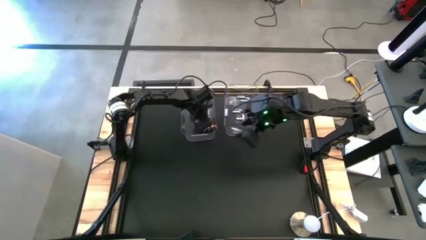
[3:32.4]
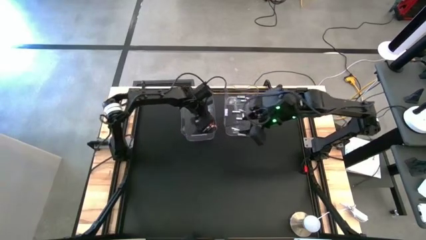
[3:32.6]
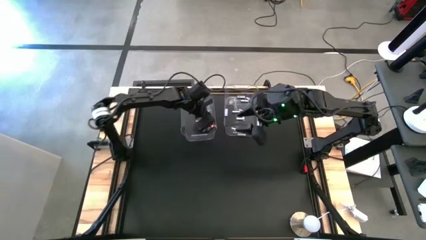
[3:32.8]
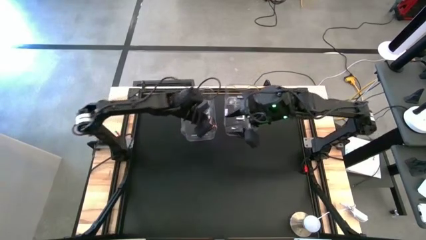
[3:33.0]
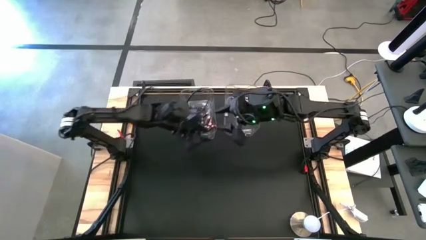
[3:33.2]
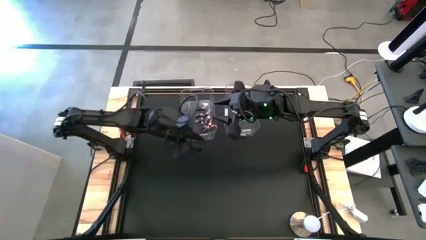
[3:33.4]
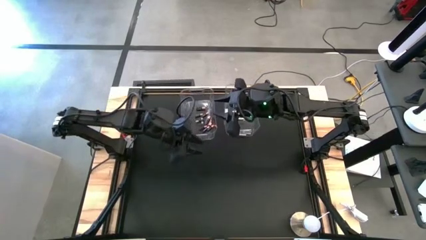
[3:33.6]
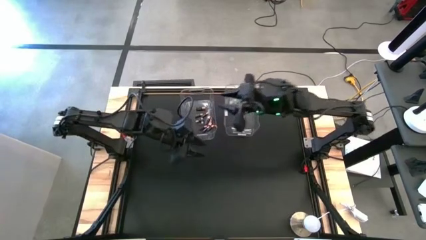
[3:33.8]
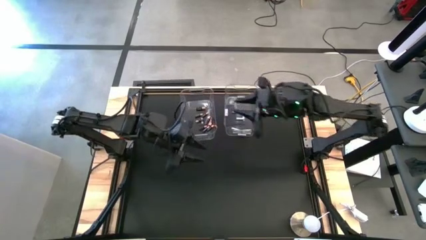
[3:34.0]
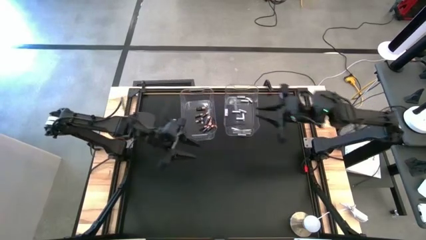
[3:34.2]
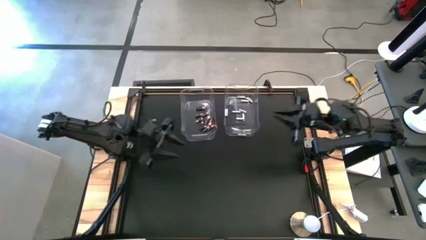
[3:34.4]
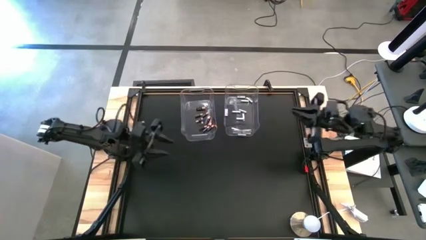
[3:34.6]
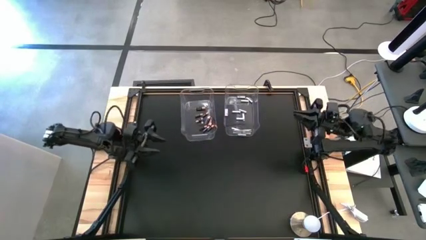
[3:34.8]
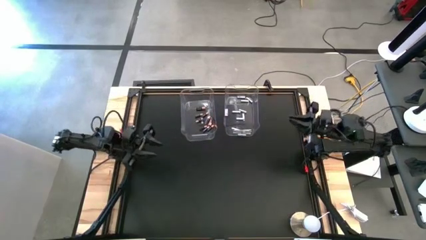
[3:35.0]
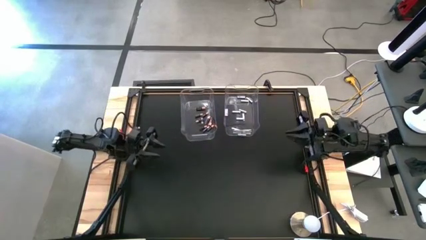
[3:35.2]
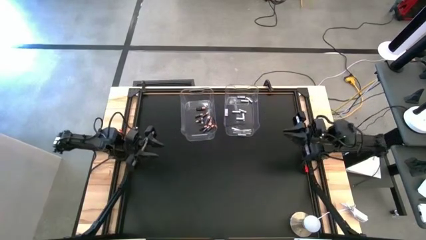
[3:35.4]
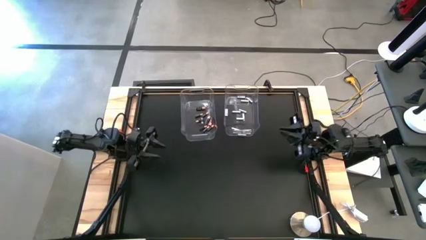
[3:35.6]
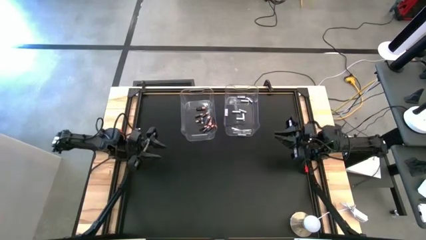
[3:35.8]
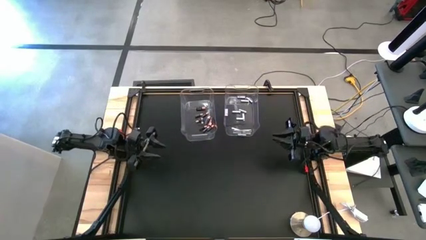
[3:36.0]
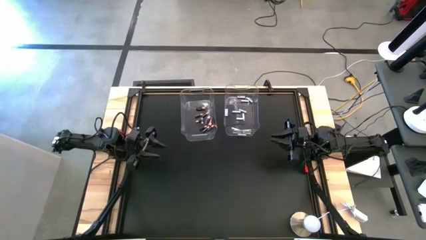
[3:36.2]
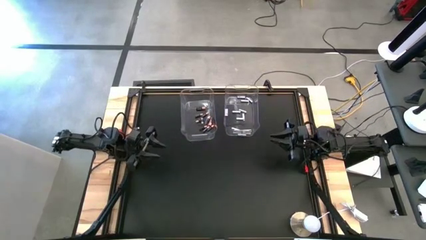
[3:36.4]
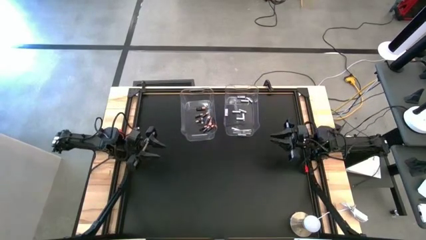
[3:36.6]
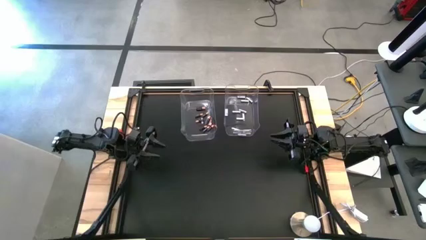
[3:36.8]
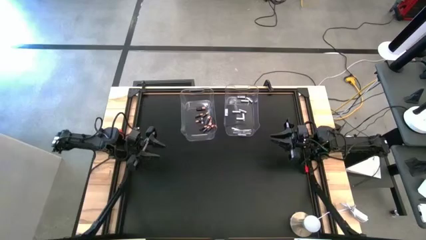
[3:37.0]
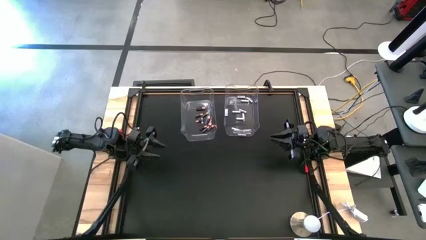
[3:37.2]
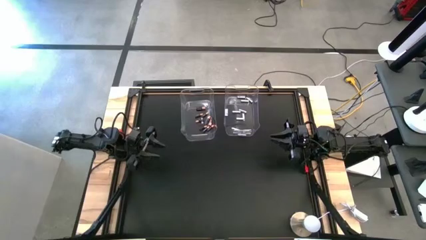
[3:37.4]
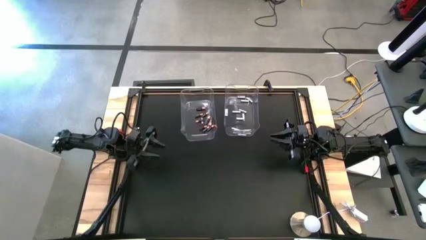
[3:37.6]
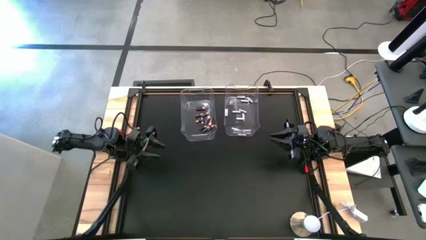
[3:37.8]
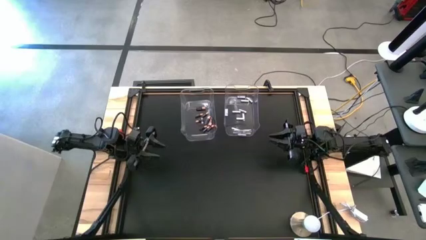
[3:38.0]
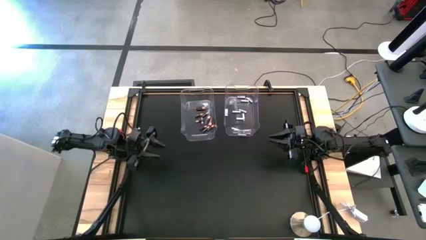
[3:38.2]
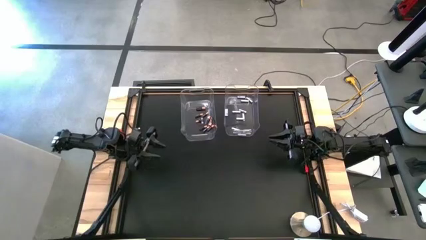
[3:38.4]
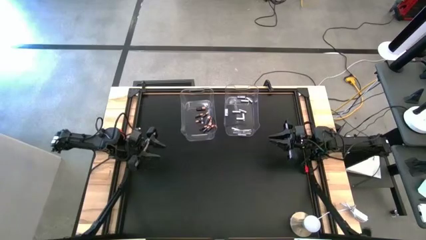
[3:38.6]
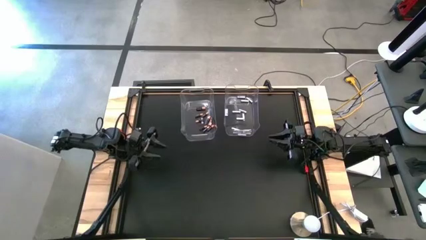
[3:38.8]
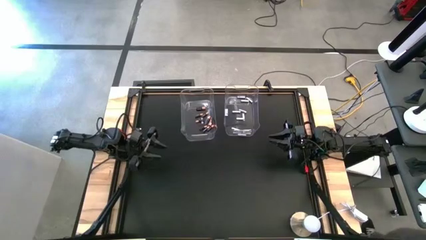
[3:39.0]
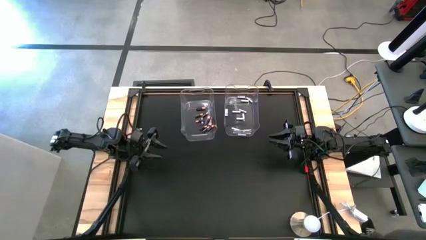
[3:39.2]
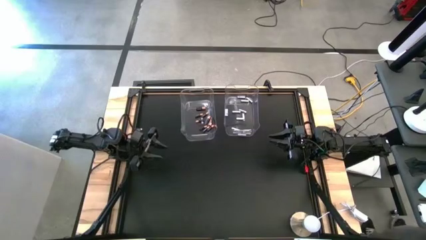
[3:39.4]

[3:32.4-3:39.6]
Task: Sort batteries
Return to home position

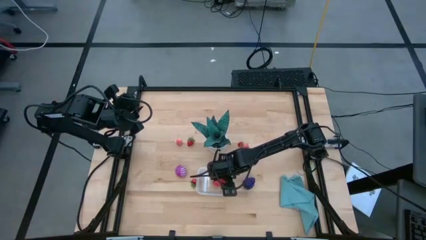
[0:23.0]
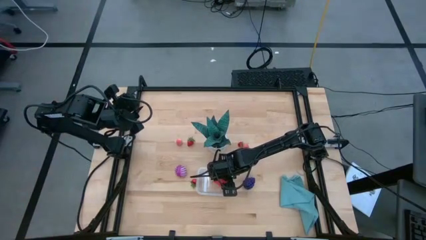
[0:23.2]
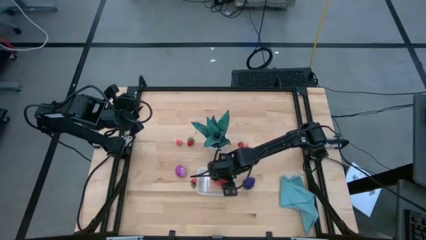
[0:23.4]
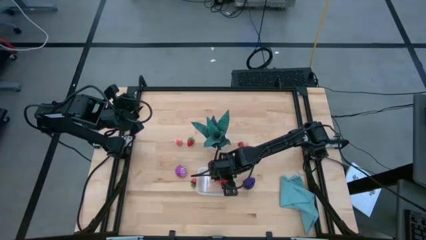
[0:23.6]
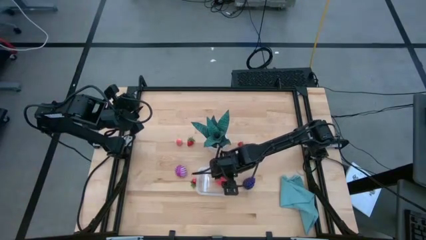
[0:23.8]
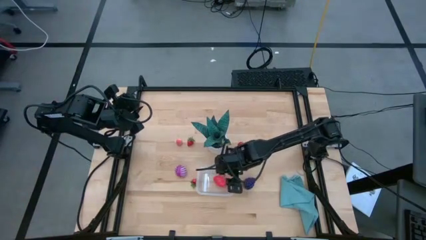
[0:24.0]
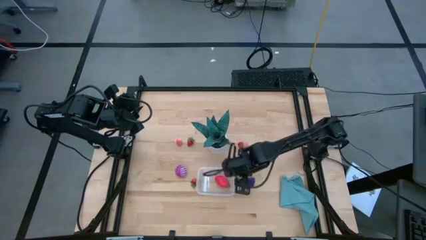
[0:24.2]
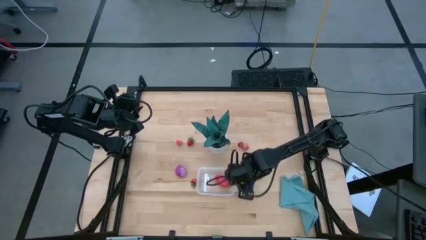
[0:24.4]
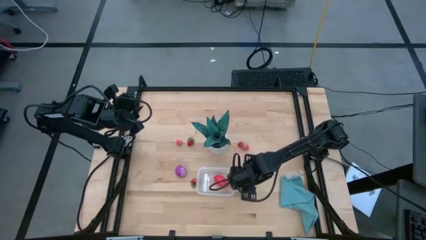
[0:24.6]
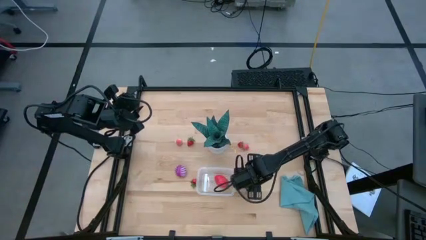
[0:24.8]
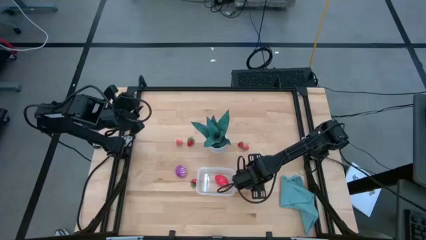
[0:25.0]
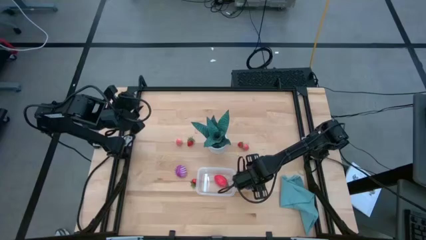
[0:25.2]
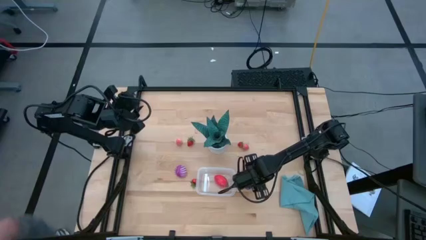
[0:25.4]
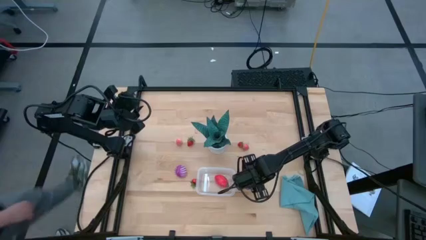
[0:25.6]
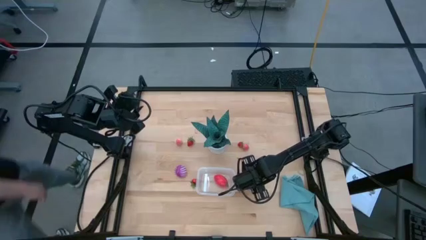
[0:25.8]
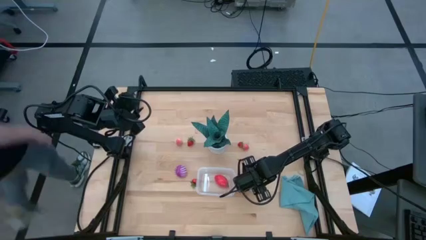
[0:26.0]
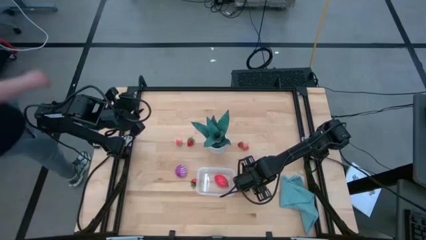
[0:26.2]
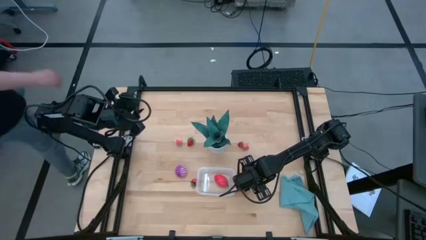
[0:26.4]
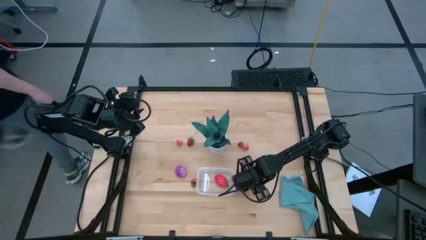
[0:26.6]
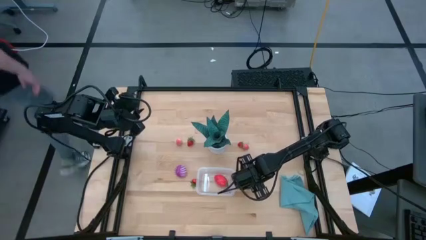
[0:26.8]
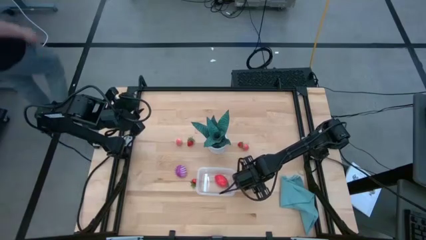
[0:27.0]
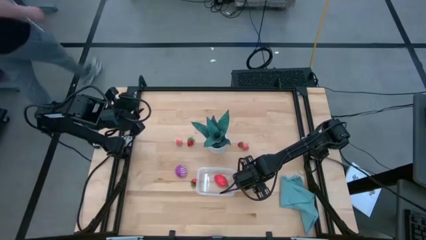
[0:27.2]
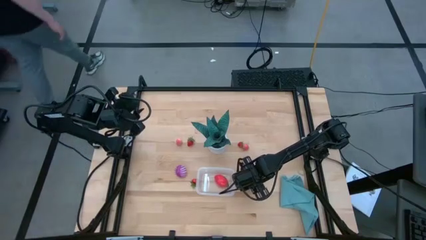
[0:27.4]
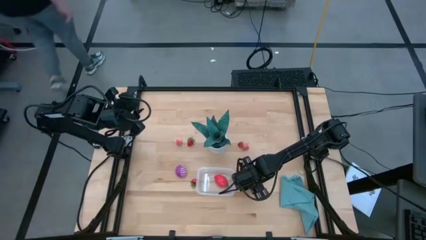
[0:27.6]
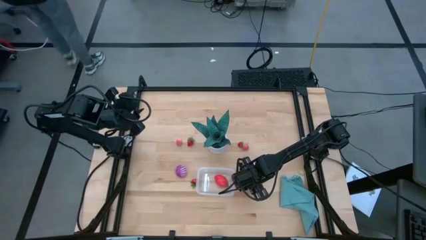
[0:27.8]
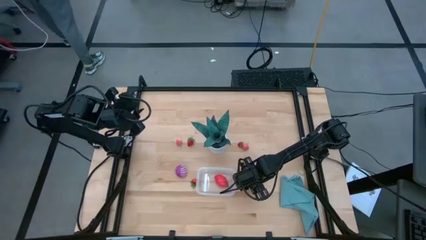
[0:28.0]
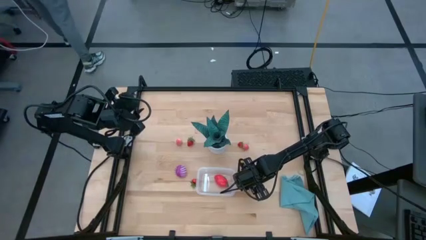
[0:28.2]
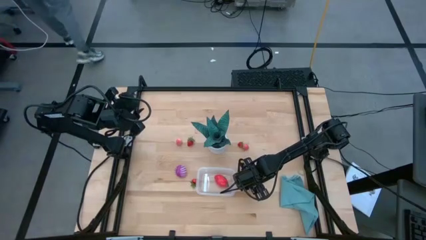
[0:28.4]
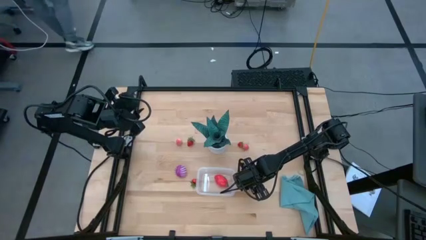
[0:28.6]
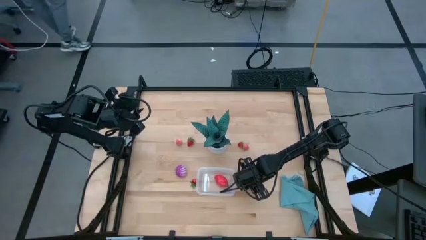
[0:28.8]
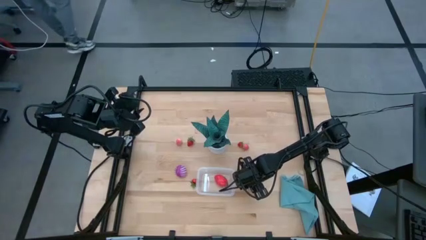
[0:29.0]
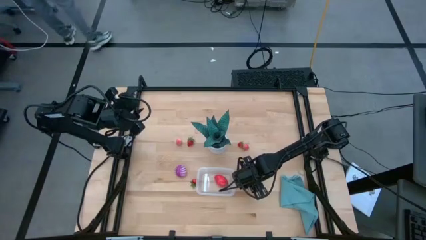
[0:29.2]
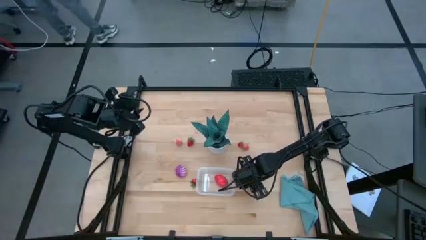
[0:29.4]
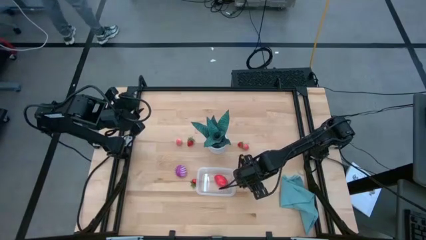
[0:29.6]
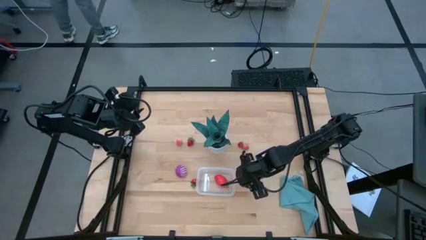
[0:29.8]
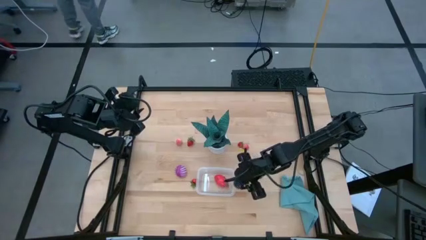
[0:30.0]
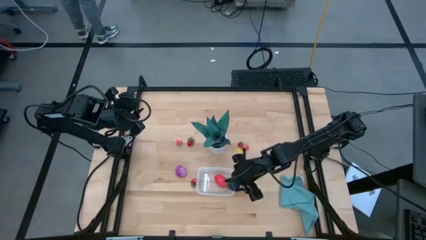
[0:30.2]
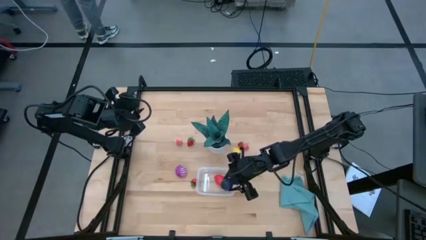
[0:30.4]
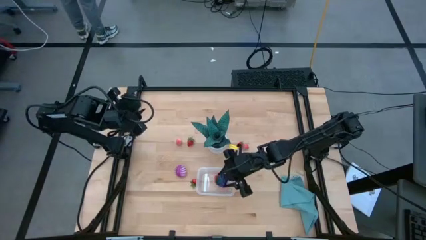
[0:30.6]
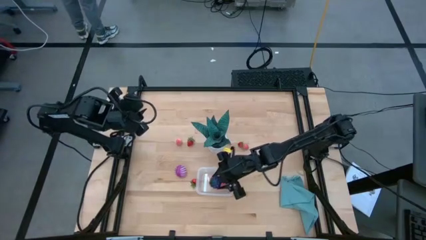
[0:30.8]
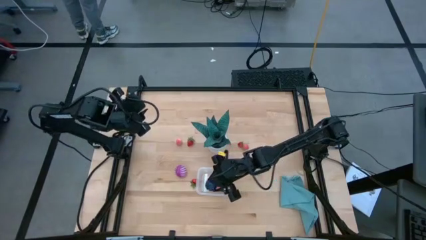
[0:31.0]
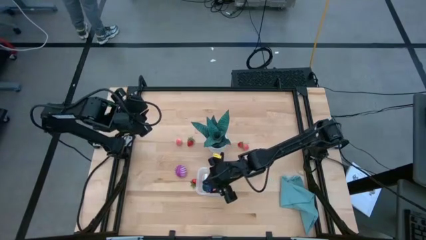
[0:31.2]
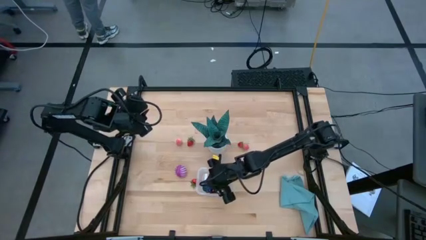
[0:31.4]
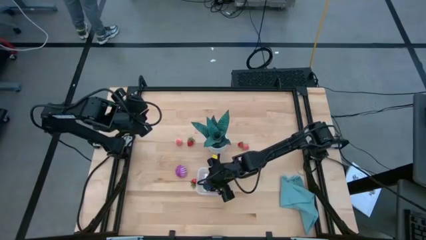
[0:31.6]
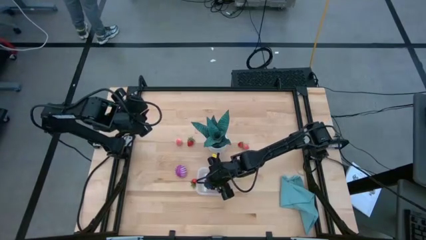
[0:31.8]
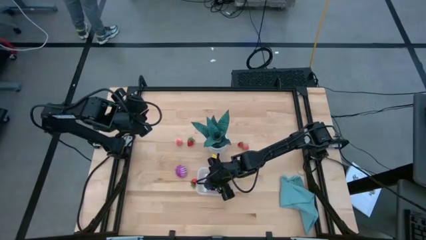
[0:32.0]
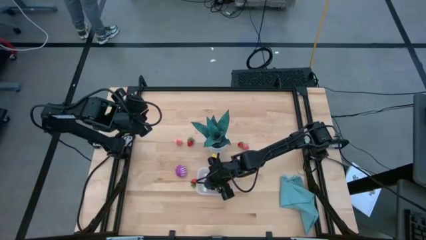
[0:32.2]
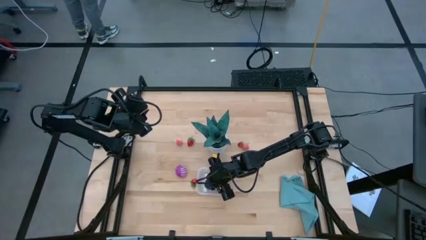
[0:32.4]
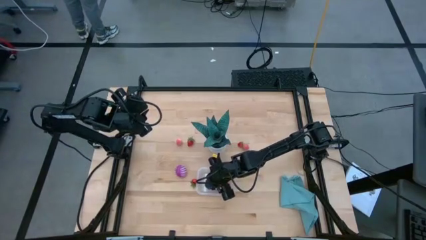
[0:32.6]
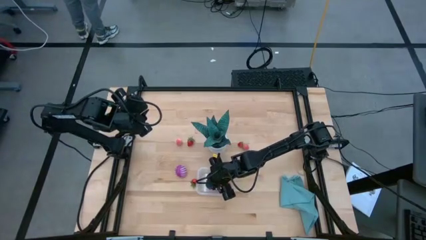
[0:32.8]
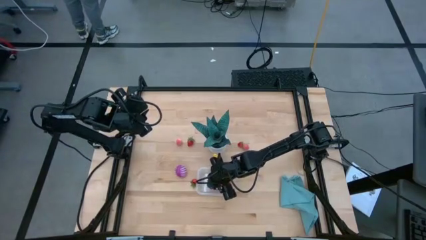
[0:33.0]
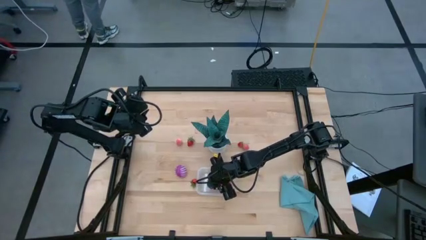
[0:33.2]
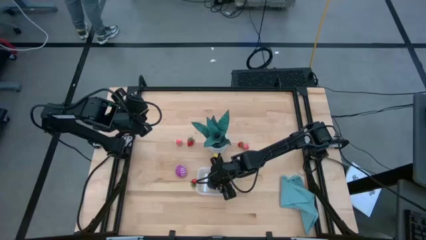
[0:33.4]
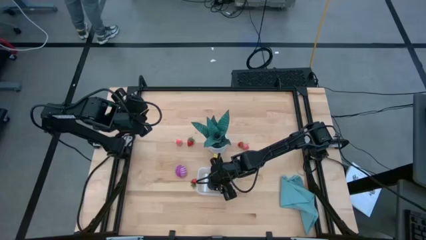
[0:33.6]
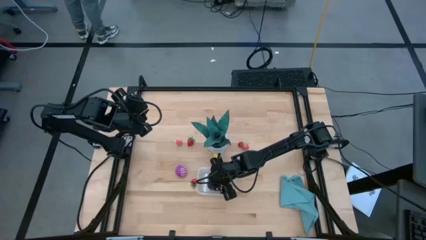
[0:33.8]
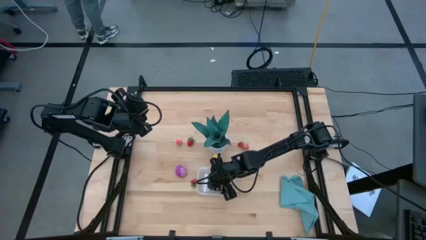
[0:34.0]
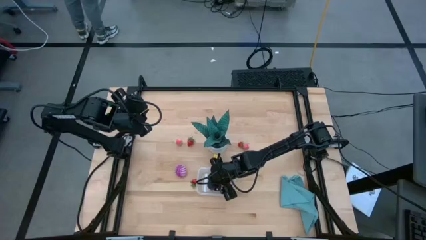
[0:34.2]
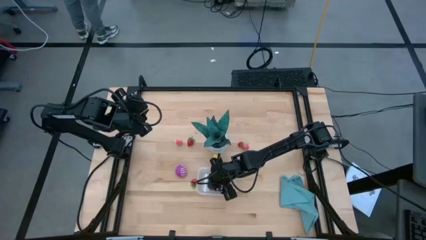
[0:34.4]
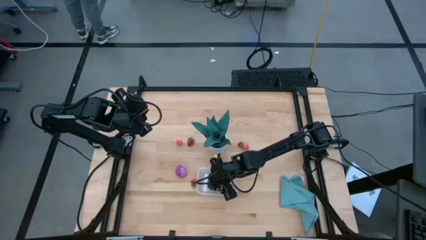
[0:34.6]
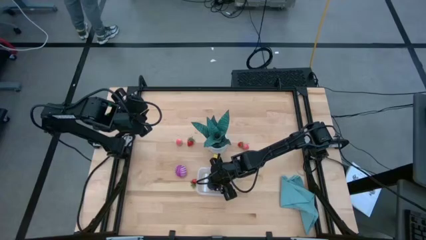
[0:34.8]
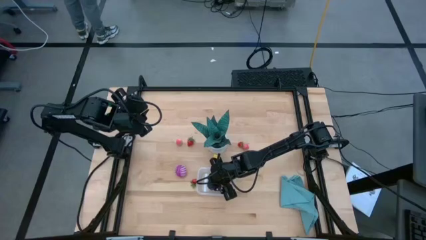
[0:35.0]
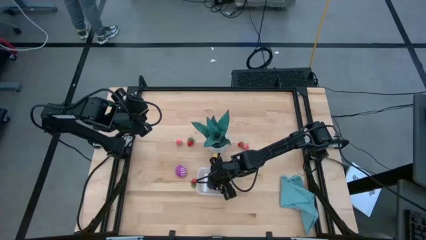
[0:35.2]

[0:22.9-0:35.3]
Task: Pick and placing Produce into tupperware
Put the purple grapes into the transparent bin
